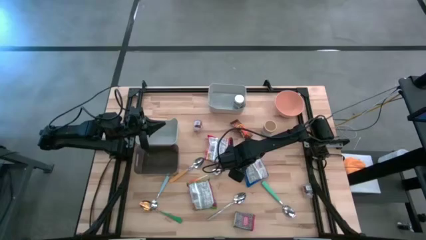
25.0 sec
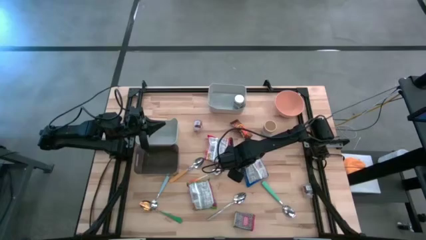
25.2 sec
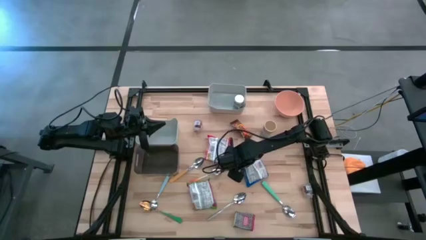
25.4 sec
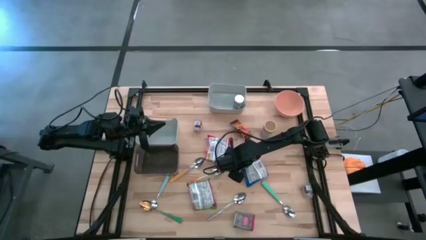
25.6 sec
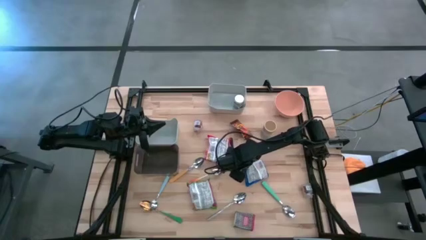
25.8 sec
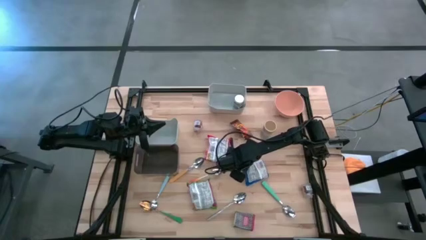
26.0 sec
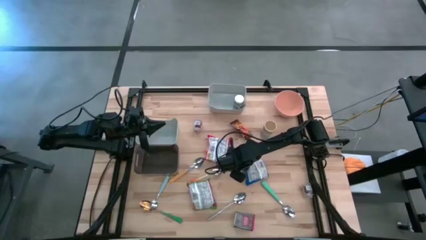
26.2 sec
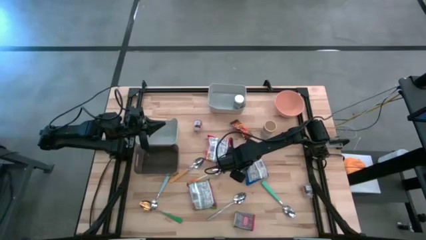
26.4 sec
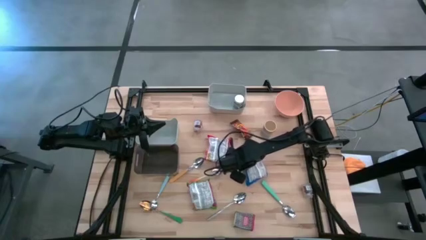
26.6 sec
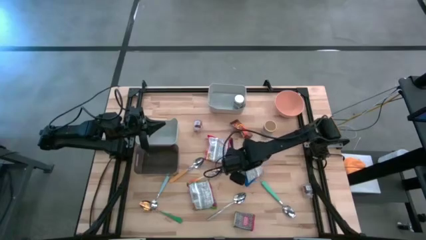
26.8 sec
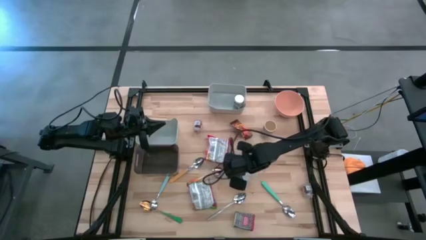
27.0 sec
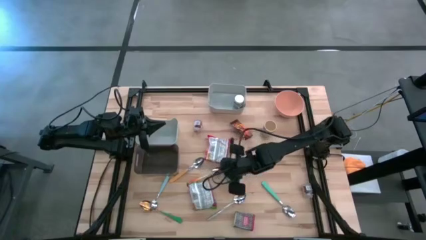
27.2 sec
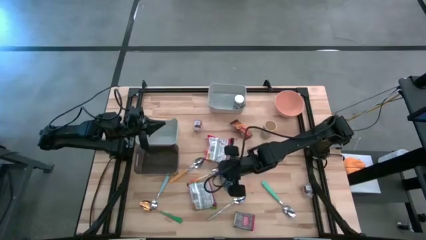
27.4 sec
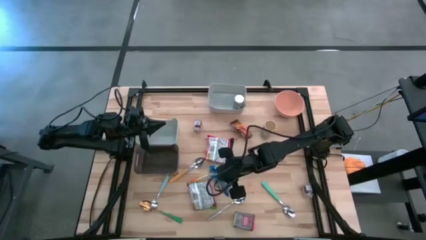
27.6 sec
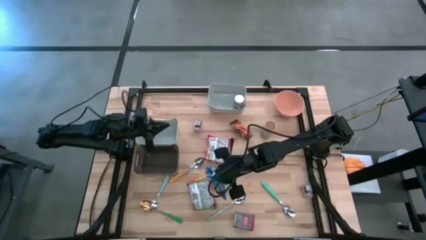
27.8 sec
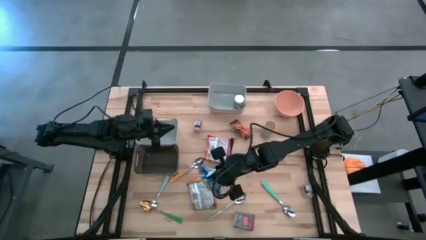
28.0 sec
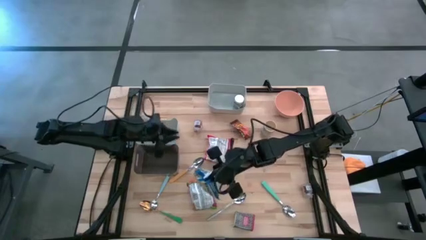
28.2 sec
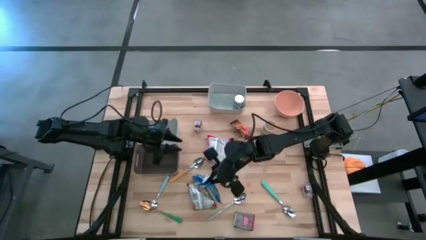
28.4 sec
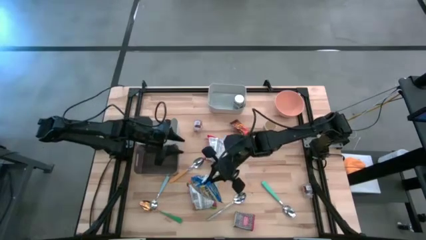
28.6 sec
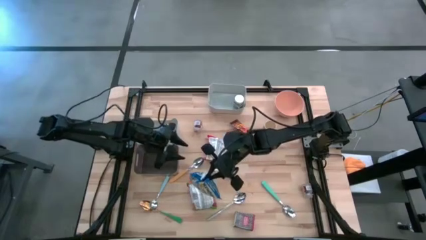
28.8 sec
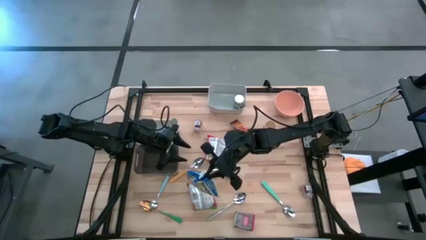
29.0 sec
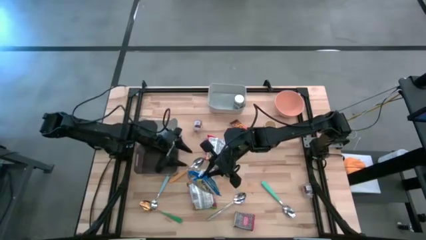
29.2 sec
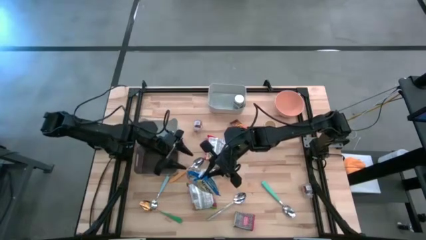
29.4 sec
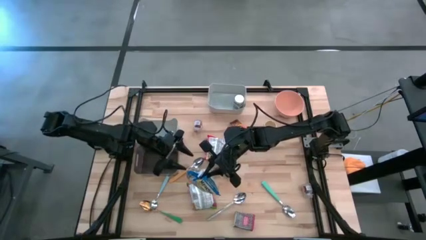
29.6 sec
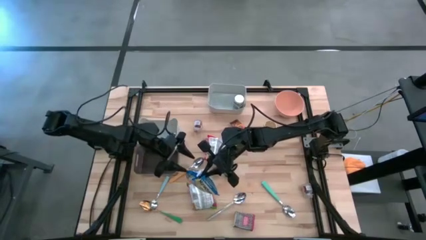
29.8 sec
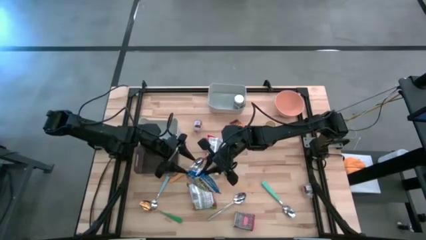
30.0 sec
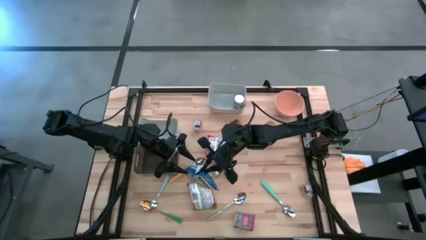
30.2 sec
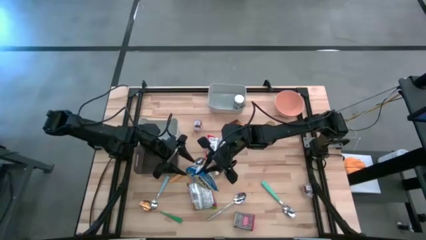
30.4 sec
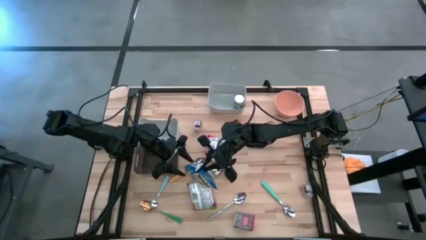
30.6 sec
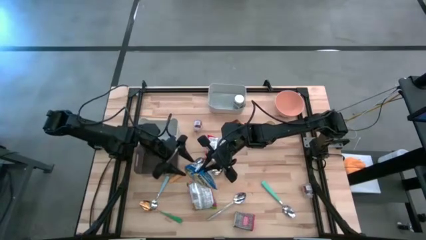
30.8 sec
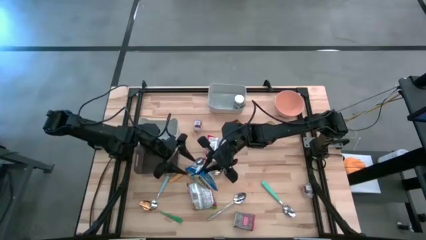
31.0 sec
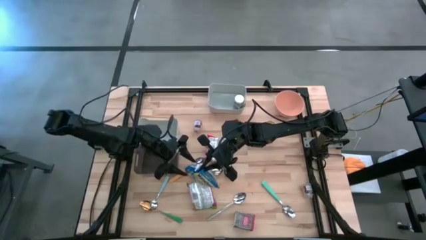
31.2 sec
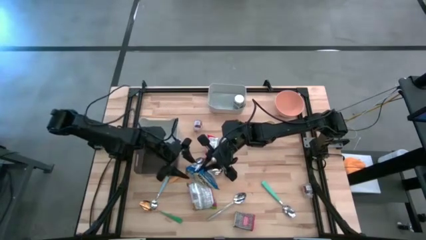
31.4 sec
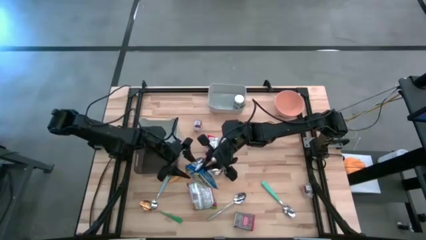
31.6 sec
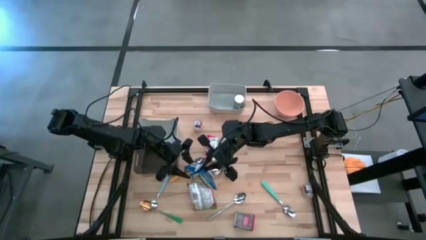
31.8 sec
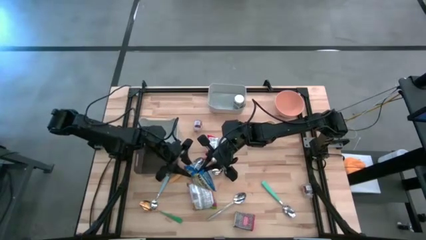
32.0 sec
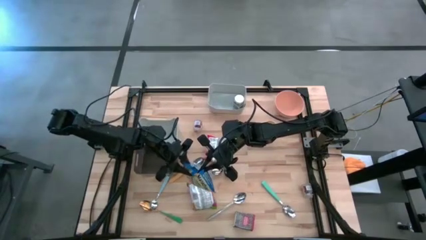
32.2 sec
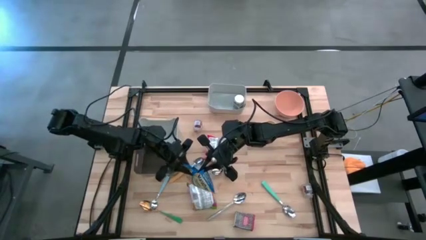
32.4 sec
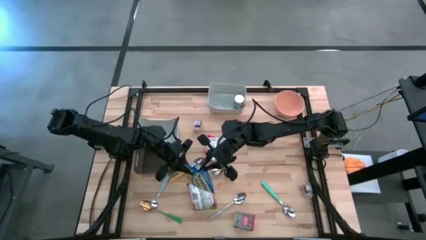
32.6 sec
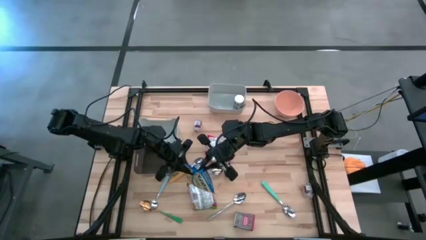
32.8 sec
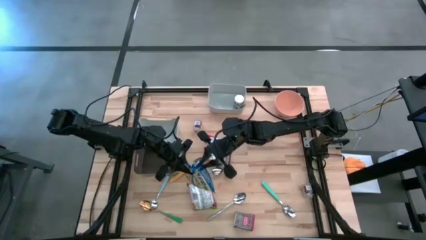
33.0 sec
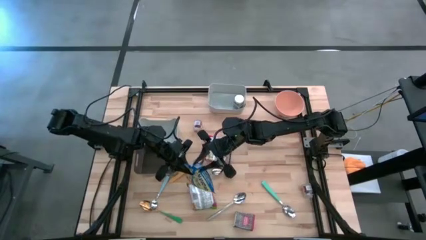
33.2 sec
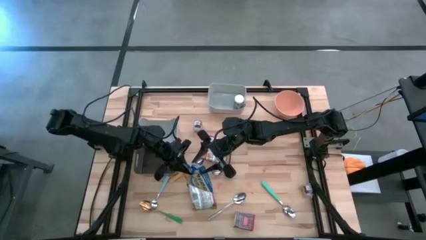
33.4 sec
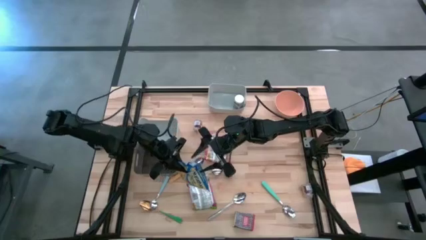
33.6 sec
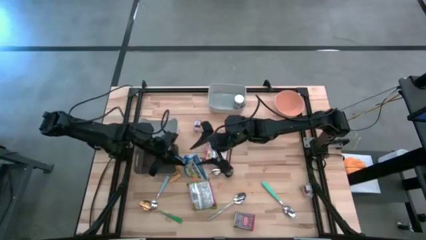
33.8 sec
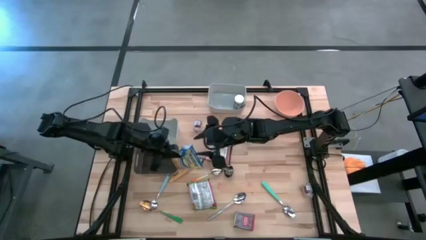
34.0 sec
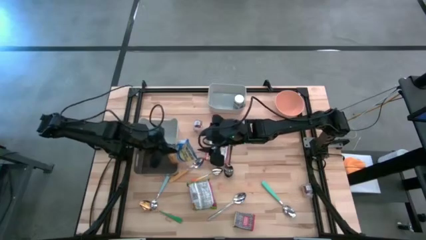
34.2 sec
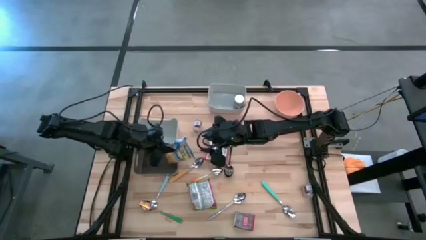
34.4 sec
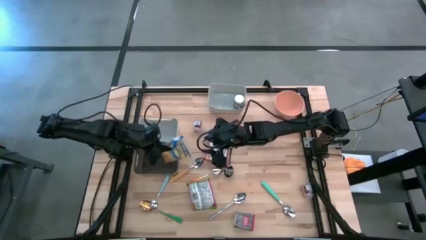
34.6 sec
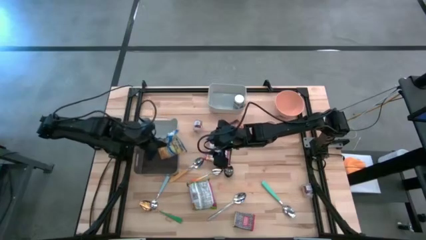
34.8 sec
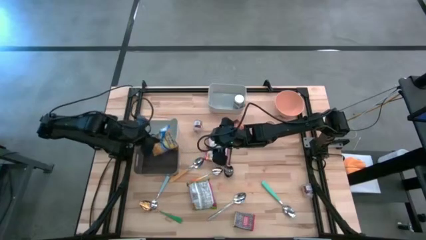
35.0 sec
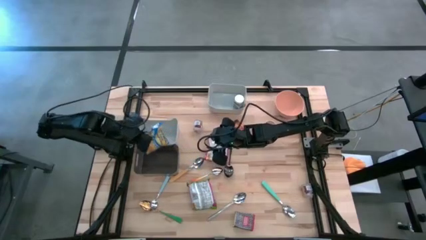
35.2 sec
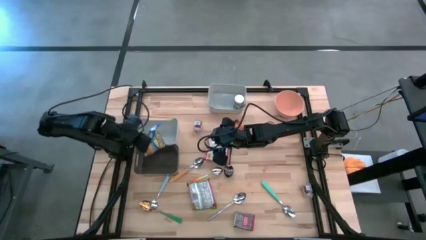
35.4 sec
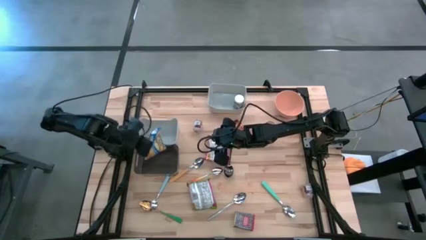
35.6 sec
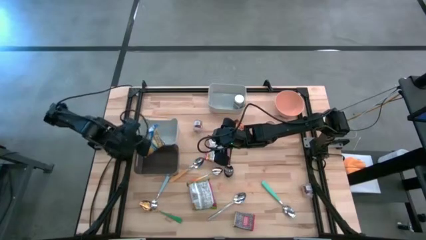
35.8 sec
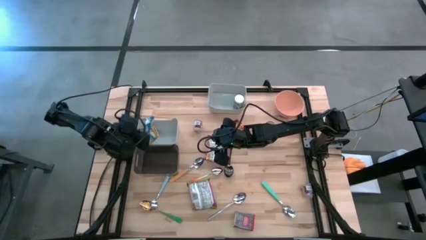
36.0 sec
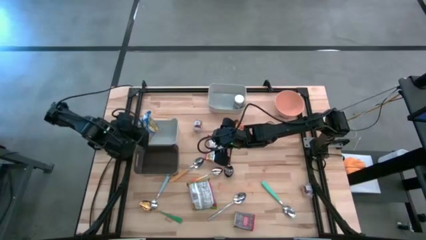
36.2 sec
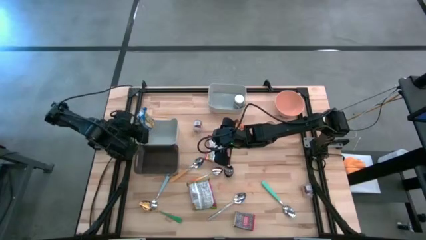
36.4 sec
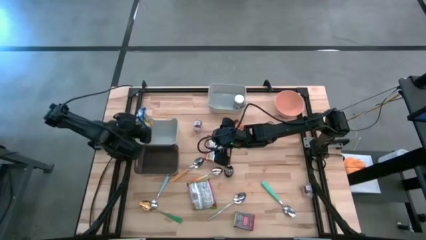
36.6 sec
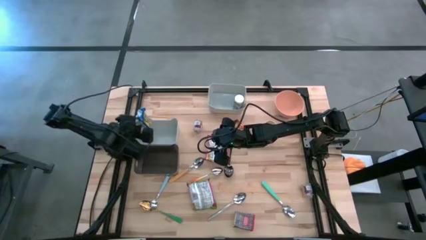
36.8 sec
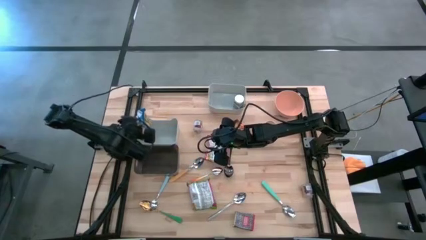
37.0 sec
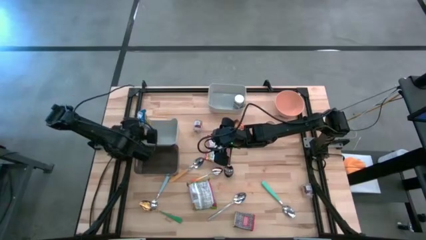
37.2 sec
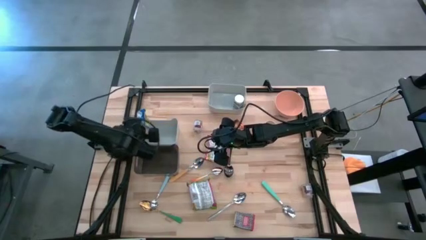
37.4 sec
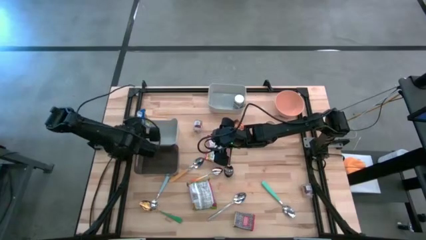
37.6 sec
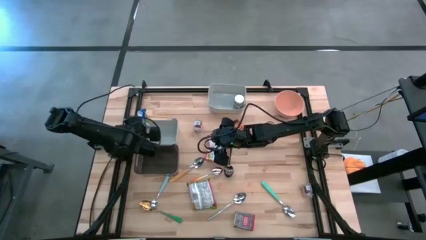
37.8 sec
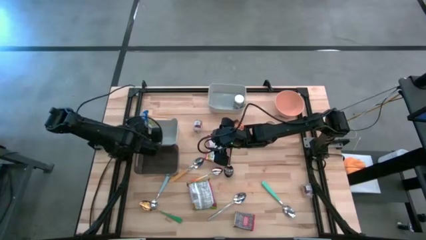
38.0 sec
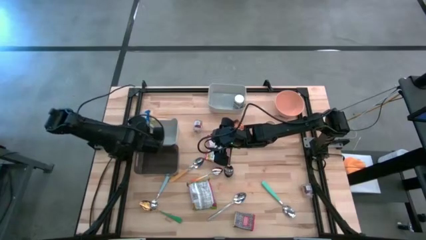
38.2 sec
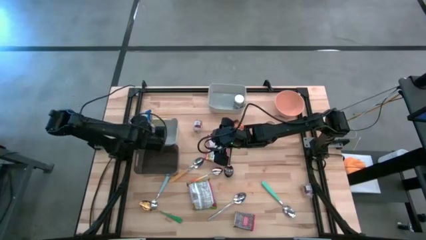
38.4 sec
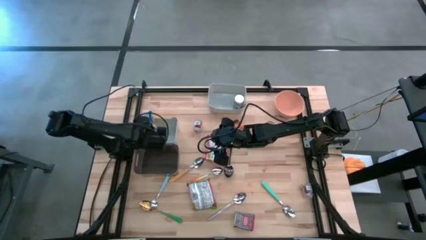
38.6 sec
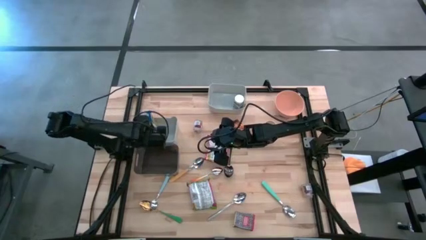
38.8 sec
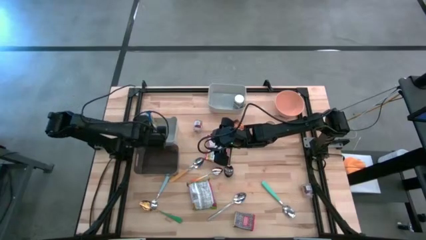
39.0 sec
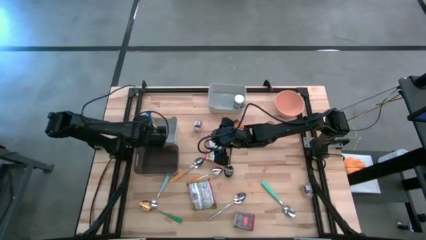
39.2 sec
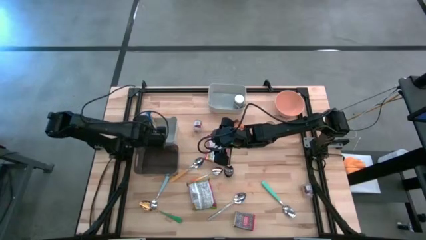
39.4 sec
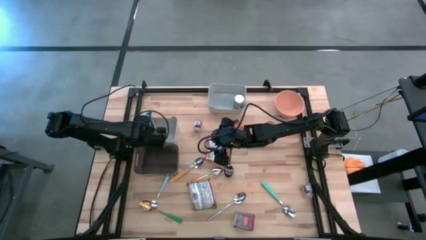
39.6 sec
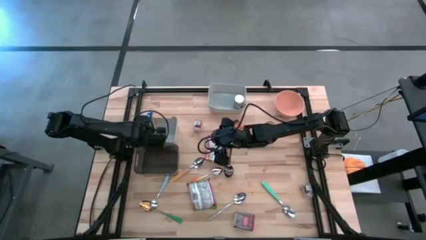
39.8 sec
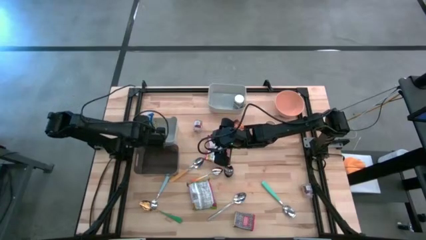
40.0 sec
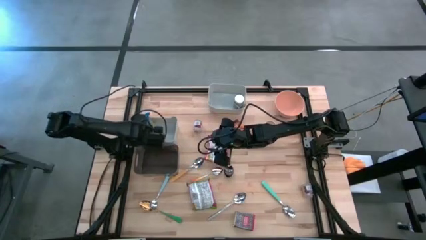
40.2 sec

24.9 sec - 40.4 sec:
Put the blue noodle pack into the bottom gray bin
